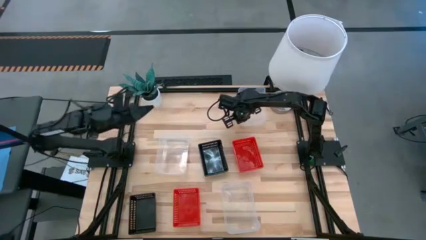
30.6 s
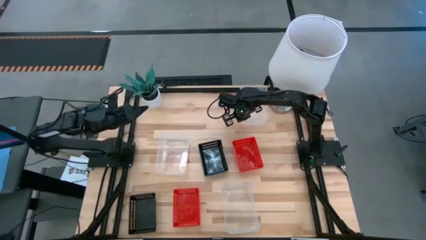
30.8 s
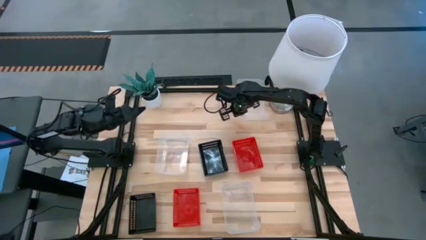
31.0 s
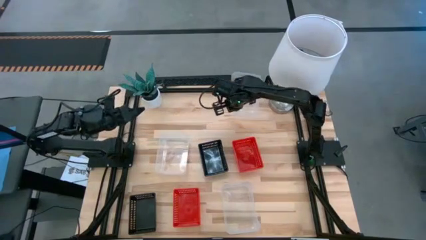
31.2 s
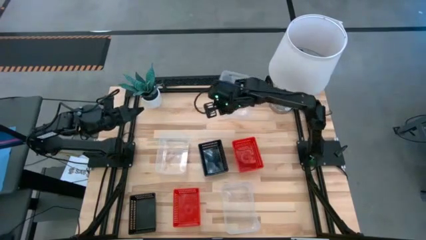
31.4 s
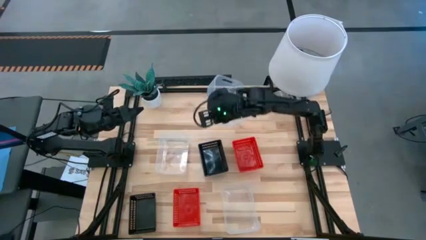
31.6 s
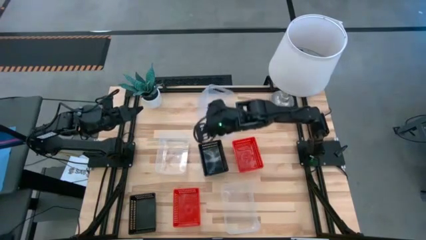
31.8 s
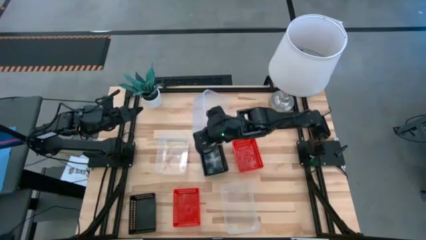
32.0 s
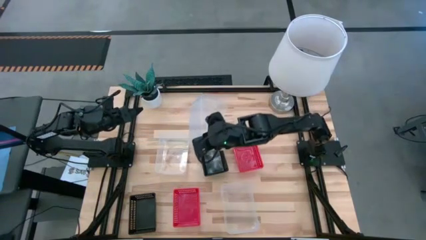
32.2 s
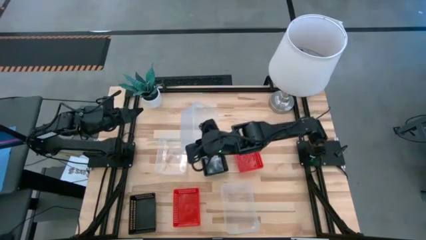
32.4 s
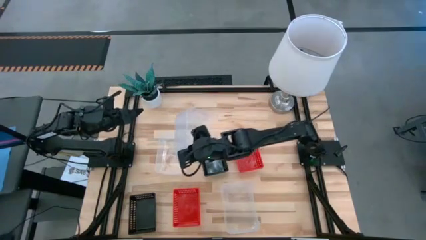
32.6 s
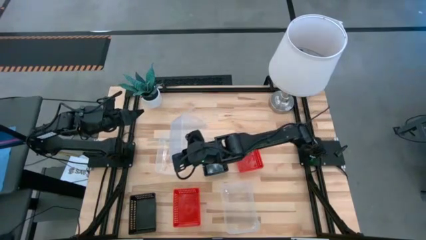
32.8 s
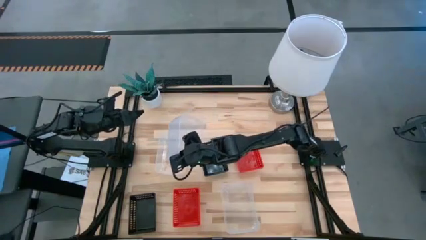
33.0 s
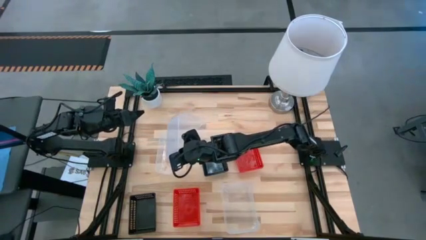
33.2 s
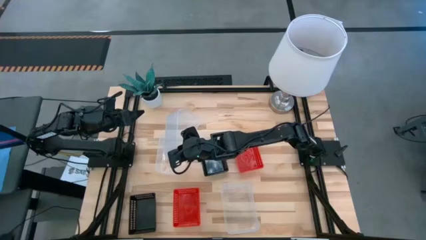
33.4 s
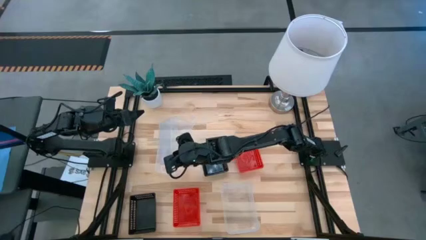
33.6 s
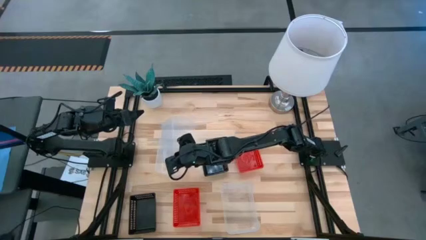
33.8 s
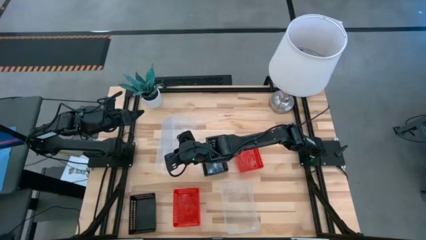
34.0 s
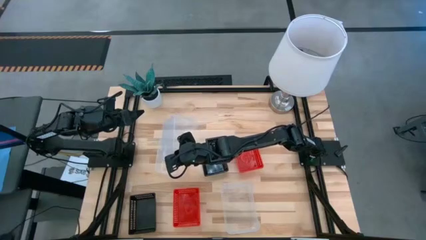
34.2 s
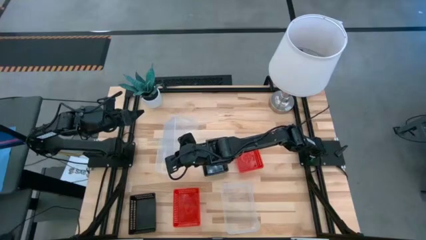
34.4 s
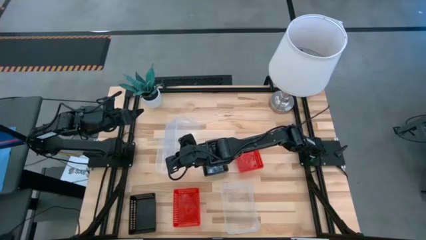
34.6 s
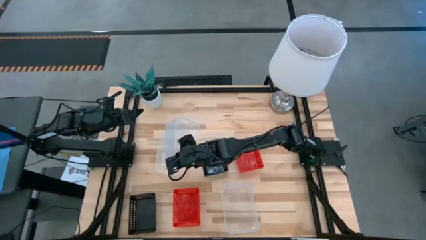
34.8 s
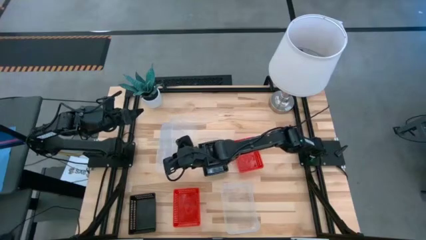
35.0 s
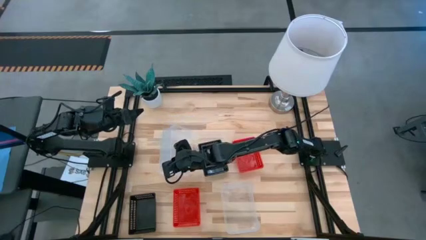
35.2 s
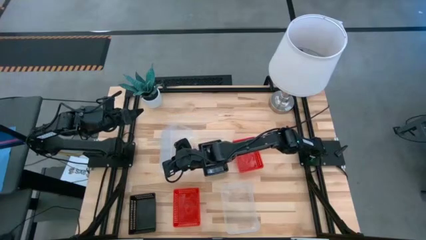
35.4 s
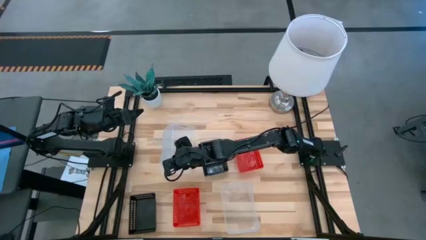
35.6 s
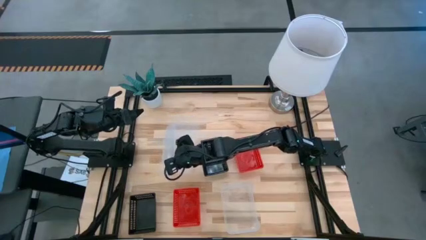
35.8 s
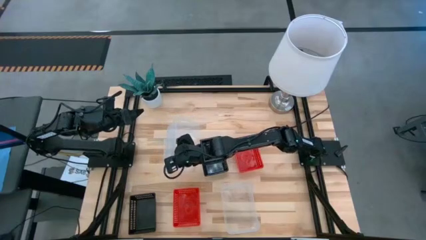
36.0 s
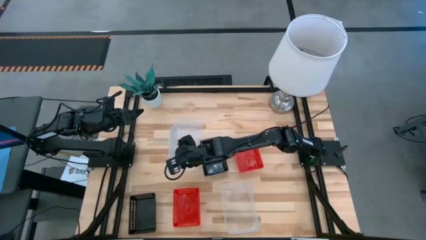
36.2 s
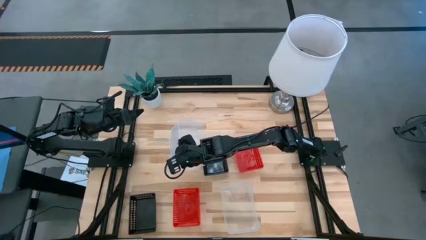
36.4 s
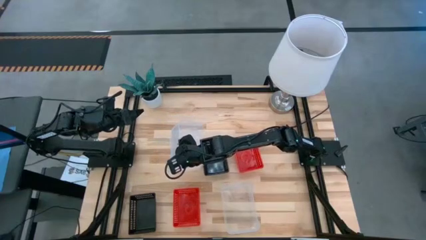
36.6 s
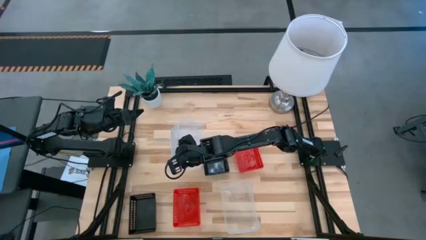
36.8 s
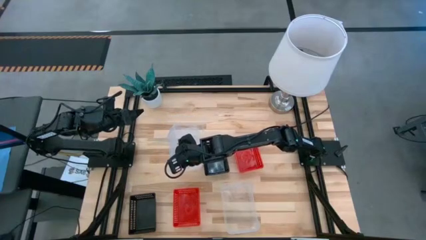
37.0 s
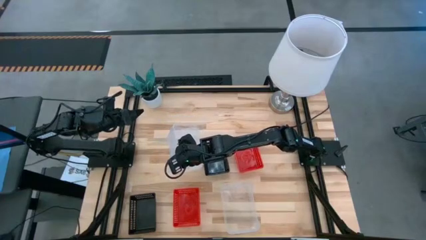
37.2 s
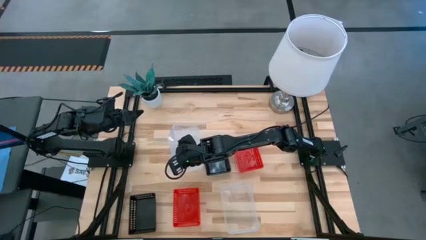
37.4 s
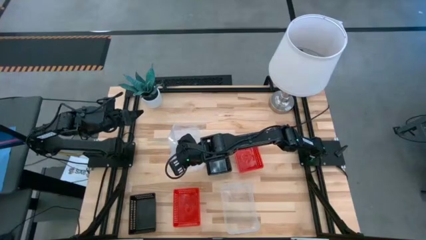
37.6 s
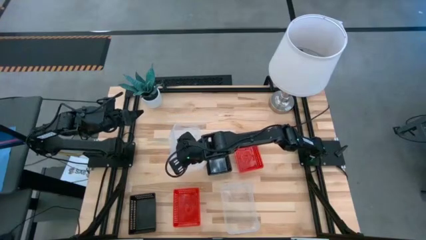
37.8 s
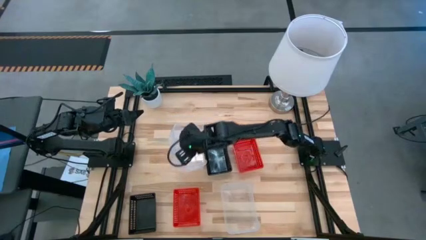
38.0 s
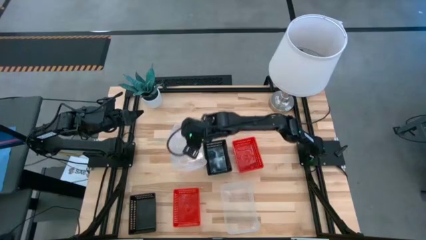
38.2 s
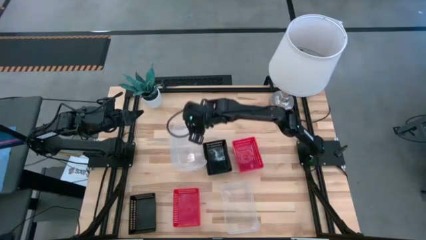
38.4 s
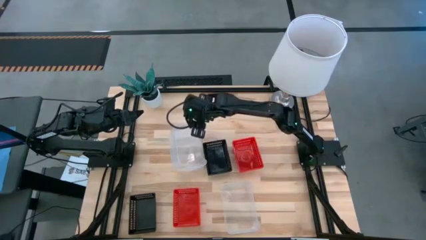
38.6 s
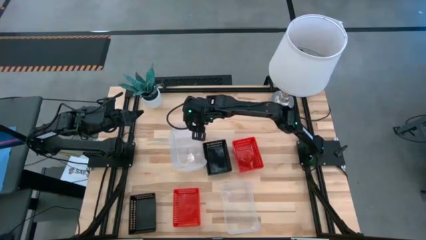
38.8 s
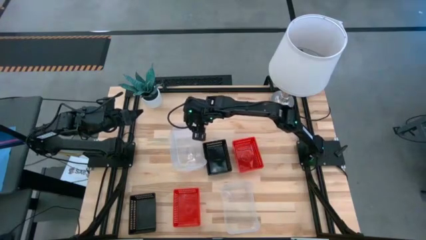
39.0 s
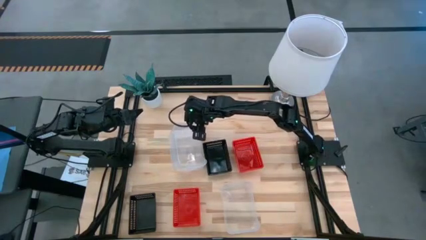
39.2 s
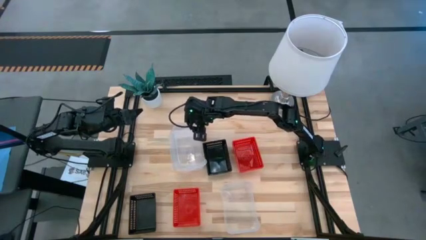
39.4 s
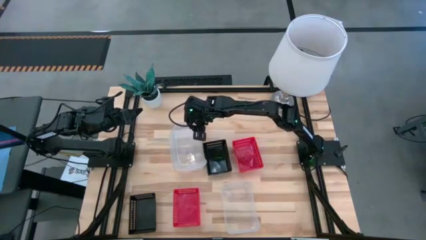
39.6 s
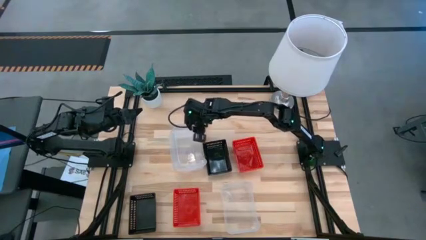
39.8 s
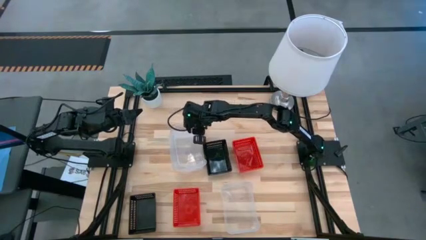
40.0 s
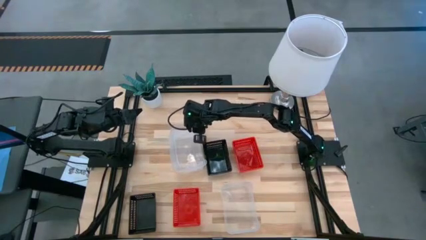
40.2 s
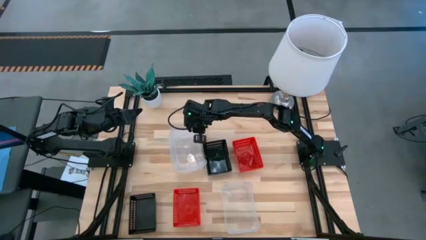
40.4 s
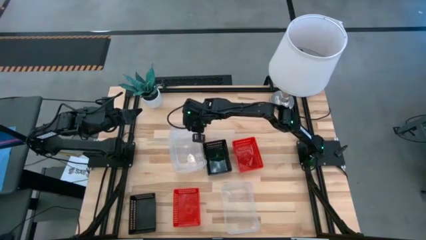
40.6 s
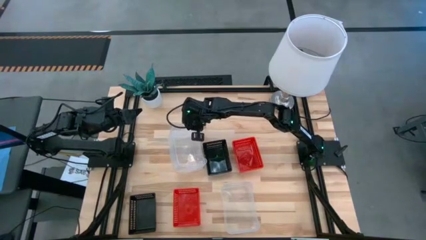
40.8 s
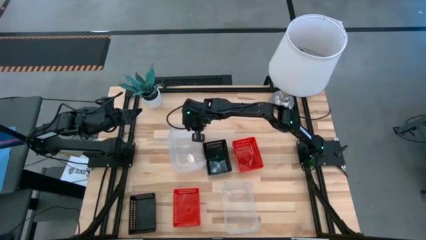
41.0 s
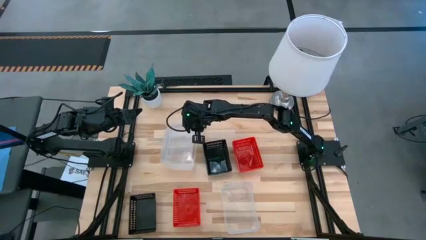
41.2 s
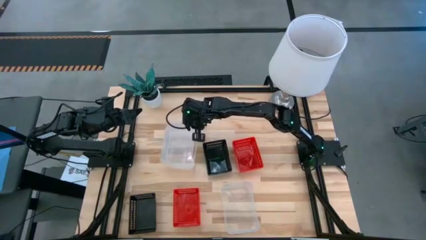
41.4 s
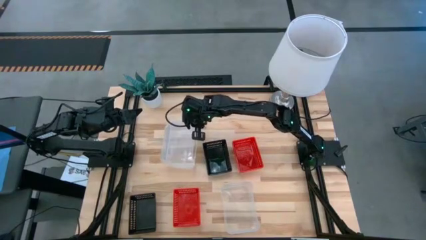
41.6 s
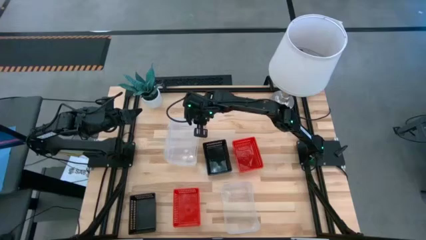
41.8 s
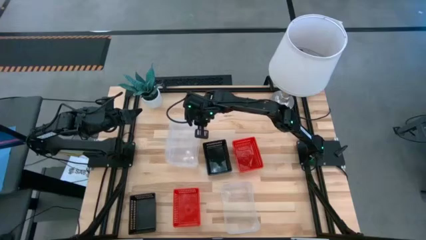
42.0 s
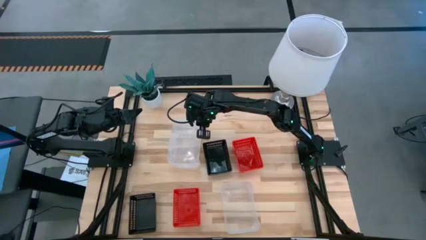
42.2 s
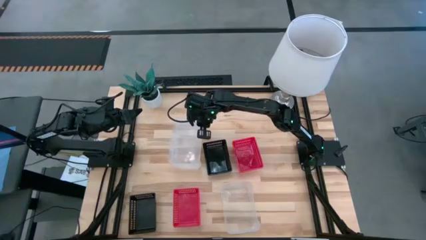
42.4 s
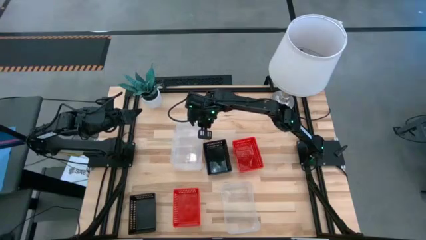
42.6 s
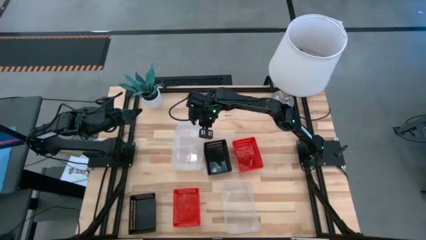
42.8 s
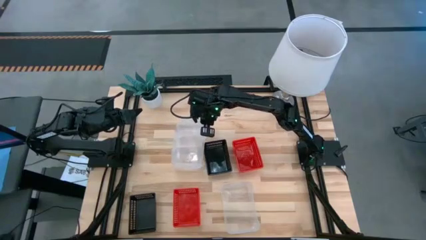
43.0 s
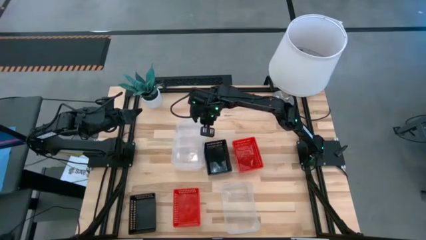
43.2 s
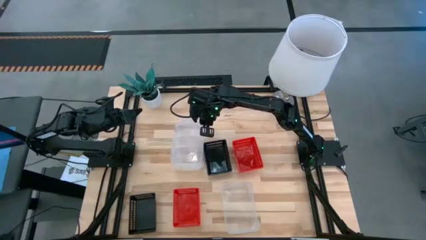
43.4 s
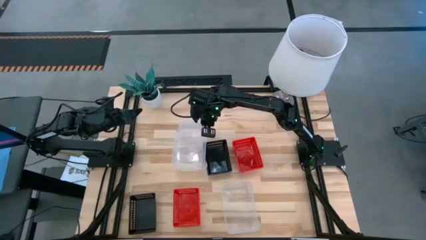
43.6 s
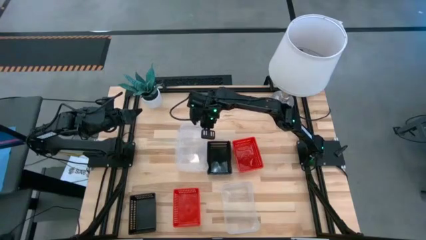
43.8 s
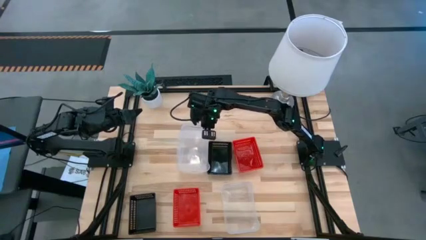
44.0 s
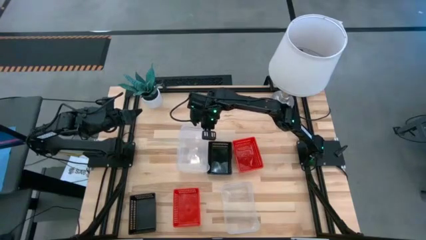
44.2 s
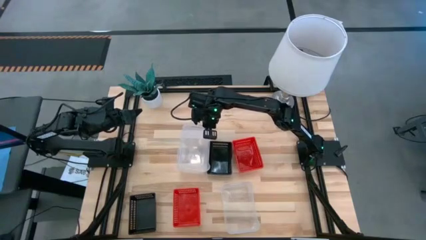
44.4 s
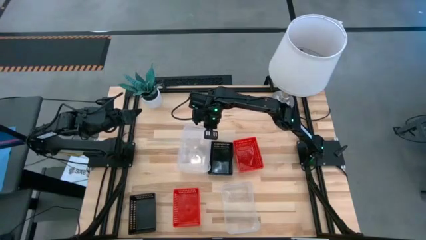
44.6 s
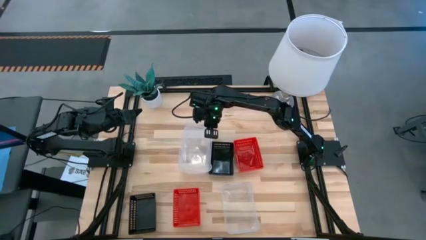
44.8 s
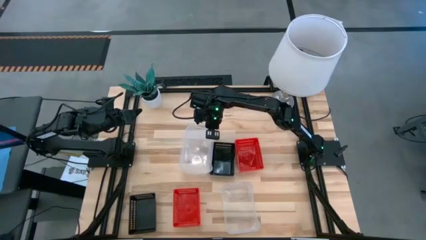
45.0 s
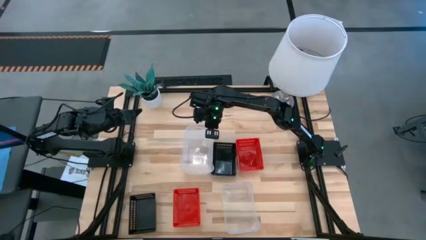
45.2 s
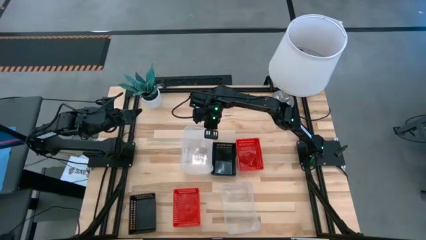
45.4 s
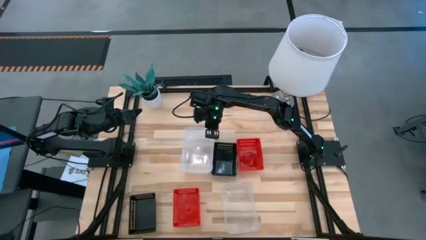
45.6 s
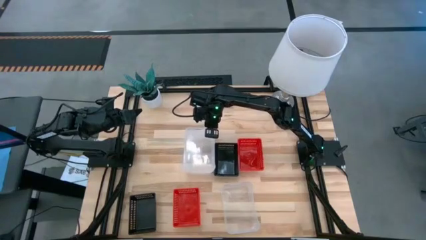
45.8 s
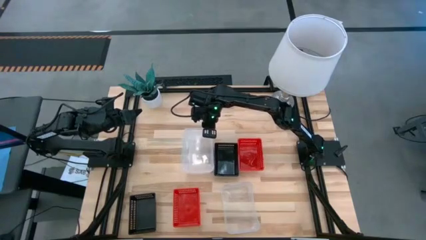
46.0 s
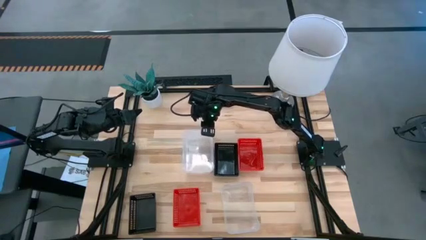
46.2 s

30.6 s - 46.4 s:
Stack the top right transparent bin on the left transparent bin
